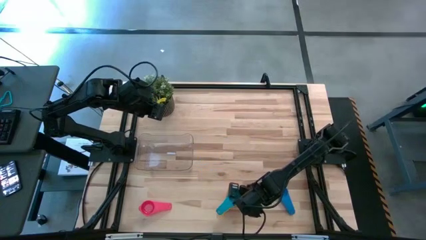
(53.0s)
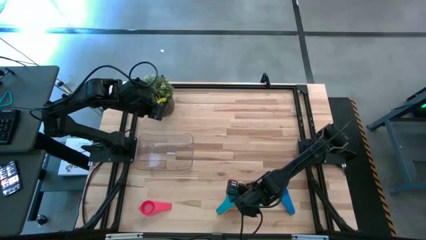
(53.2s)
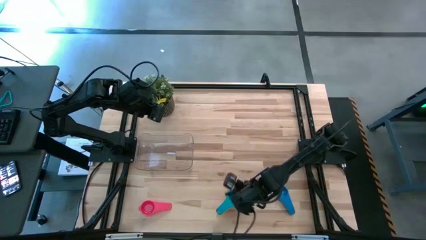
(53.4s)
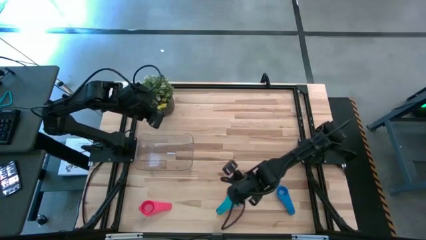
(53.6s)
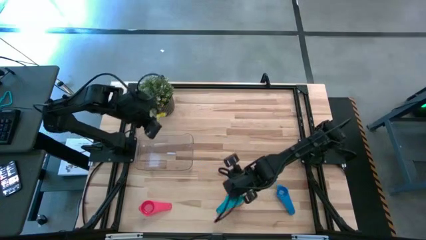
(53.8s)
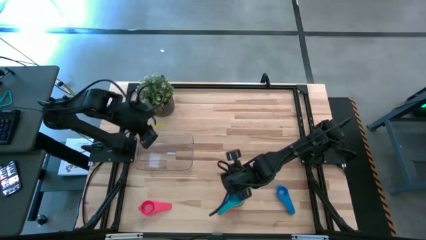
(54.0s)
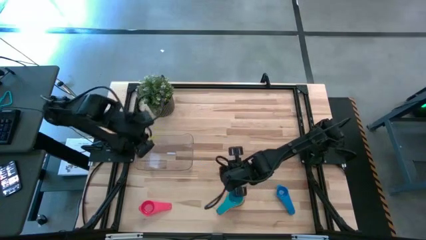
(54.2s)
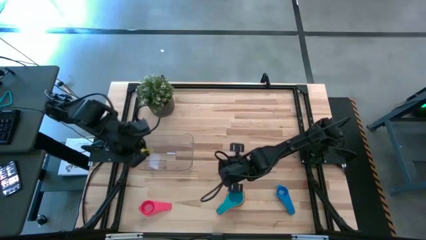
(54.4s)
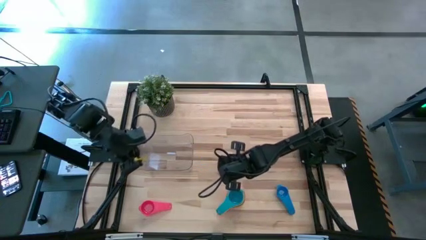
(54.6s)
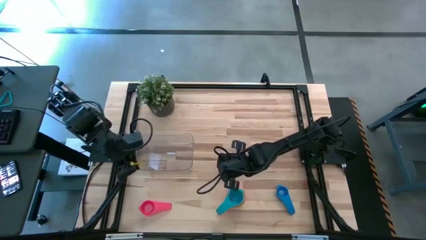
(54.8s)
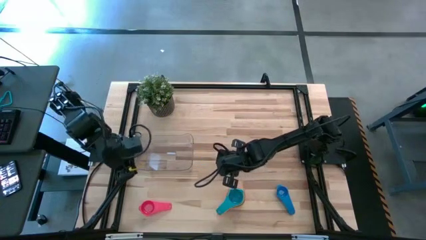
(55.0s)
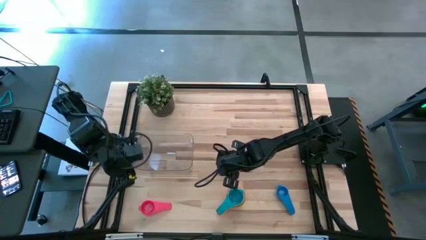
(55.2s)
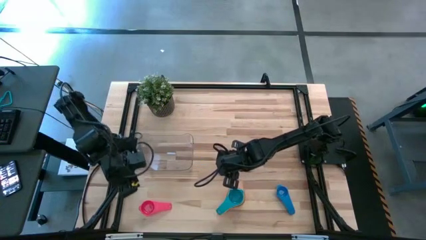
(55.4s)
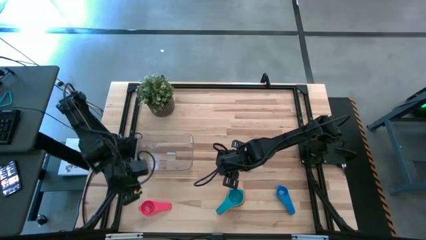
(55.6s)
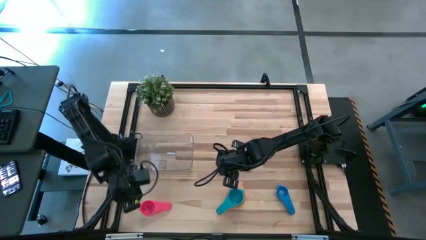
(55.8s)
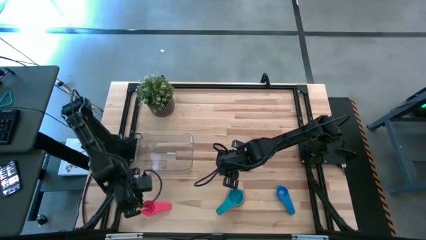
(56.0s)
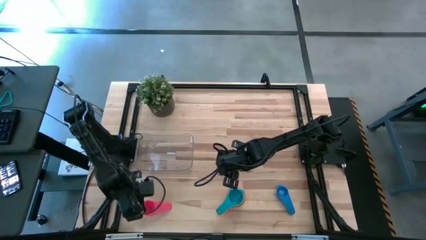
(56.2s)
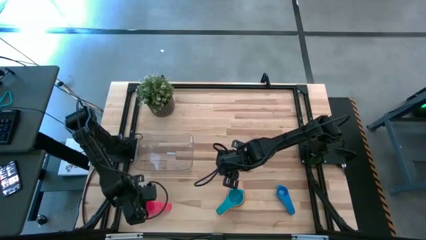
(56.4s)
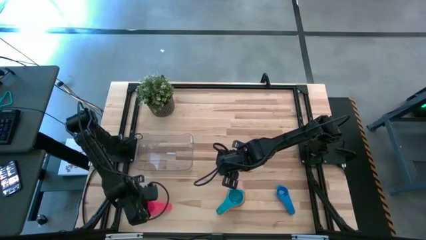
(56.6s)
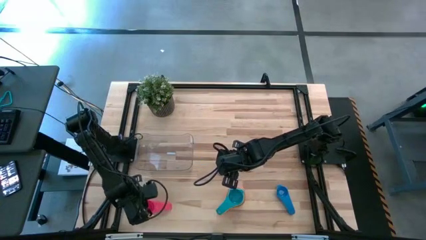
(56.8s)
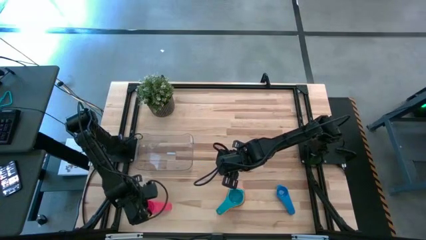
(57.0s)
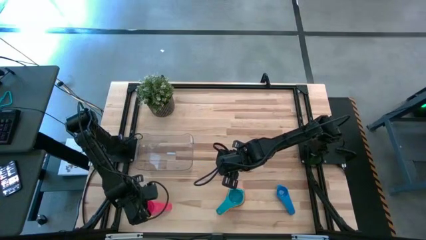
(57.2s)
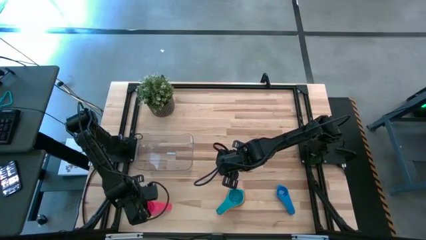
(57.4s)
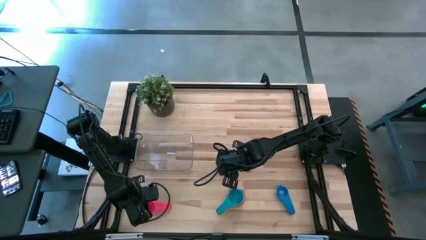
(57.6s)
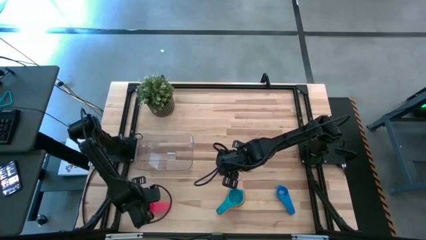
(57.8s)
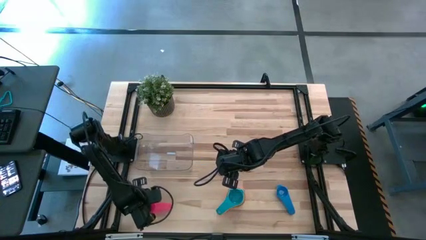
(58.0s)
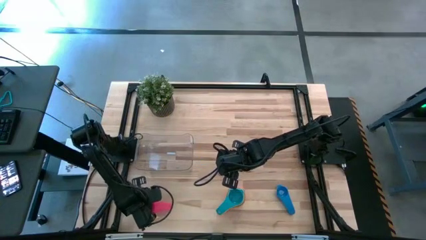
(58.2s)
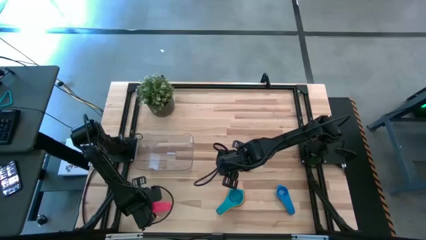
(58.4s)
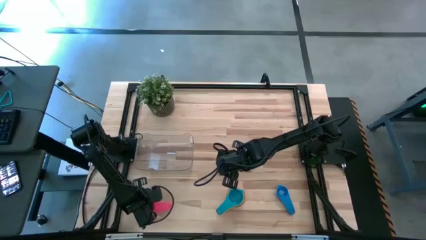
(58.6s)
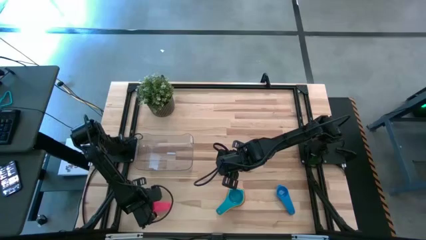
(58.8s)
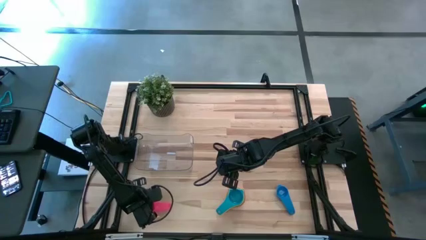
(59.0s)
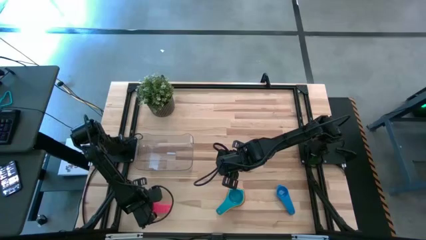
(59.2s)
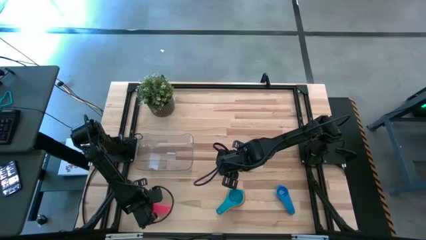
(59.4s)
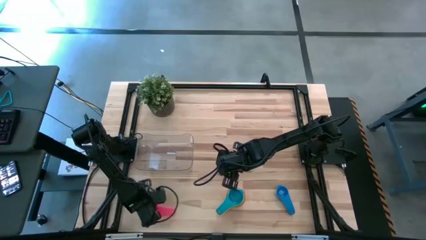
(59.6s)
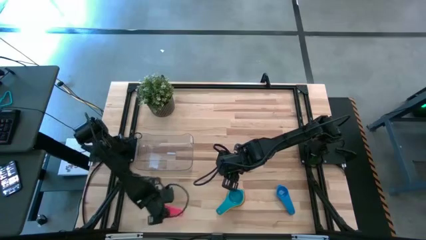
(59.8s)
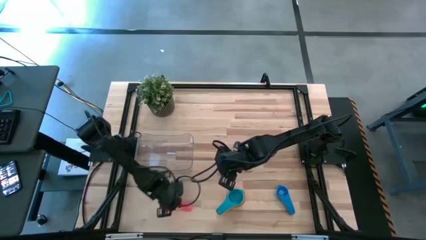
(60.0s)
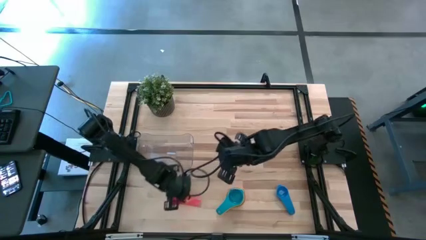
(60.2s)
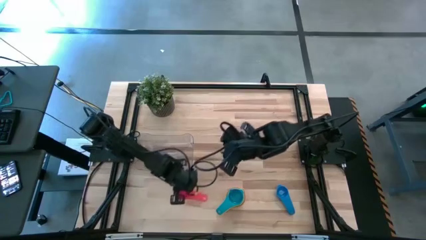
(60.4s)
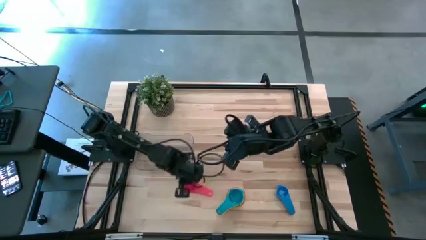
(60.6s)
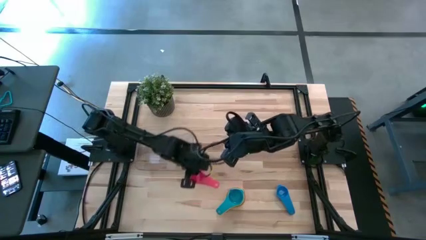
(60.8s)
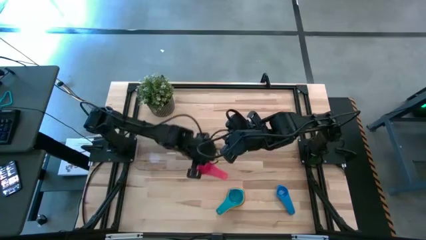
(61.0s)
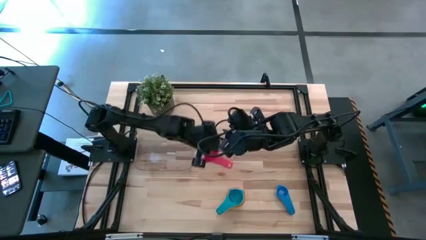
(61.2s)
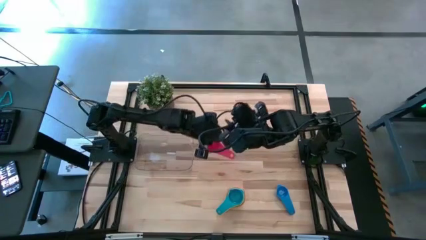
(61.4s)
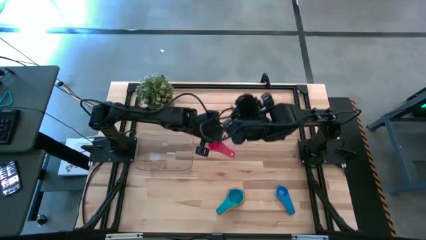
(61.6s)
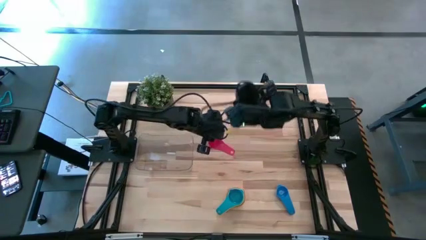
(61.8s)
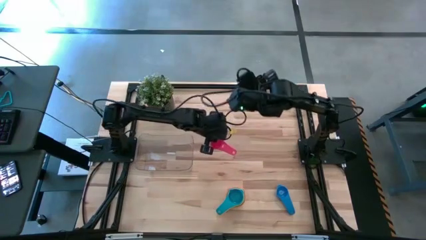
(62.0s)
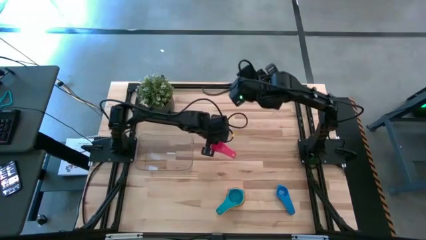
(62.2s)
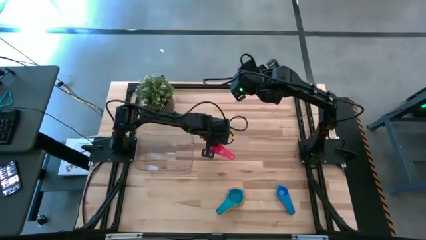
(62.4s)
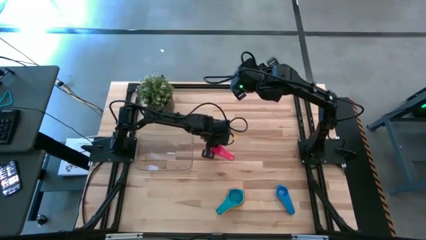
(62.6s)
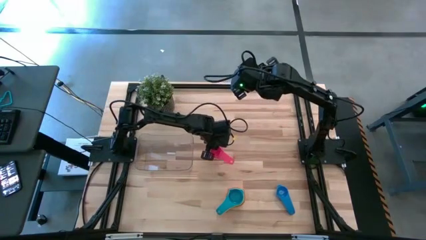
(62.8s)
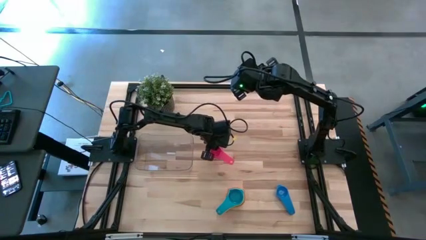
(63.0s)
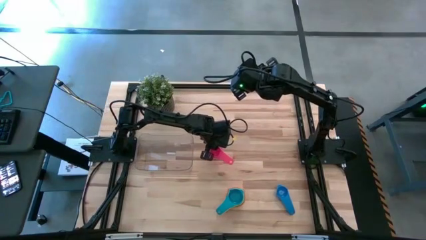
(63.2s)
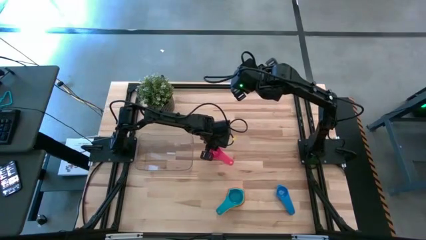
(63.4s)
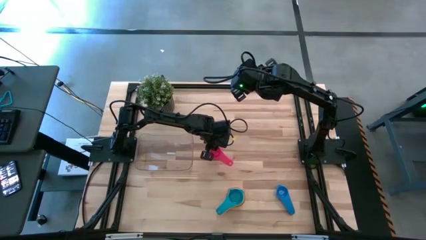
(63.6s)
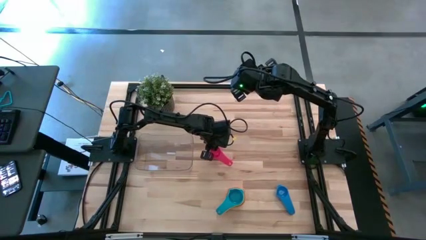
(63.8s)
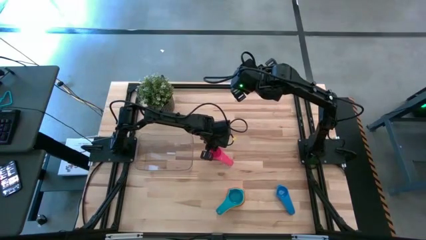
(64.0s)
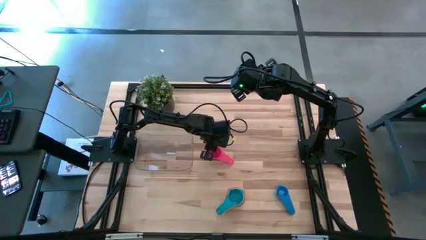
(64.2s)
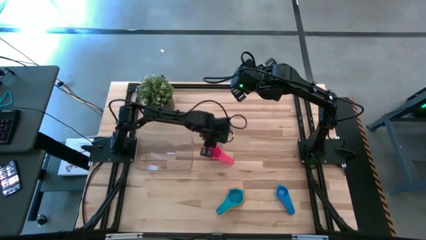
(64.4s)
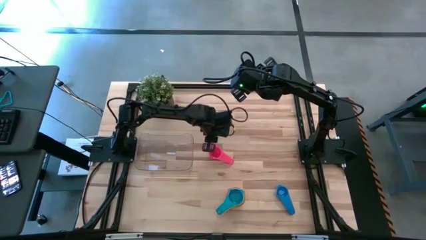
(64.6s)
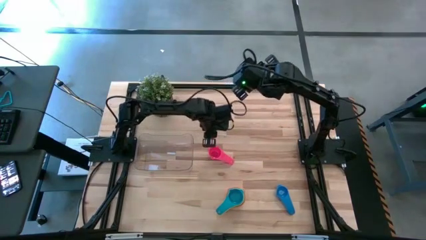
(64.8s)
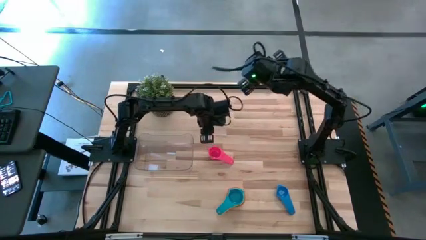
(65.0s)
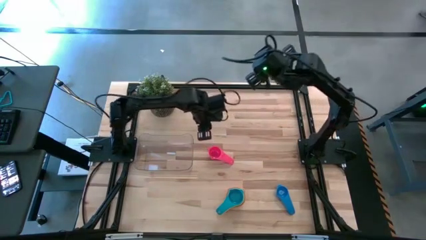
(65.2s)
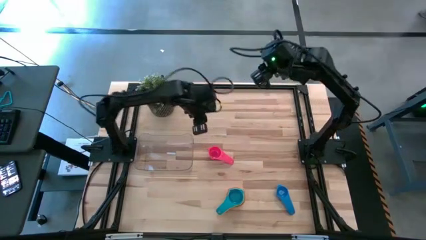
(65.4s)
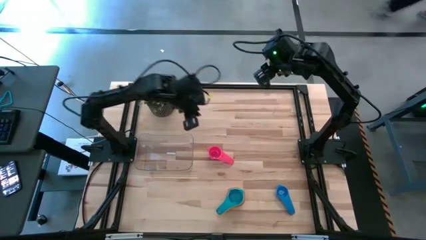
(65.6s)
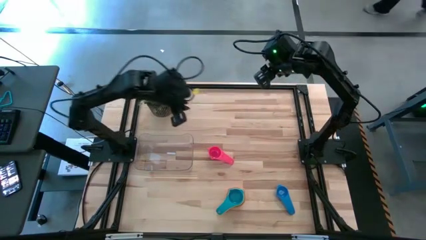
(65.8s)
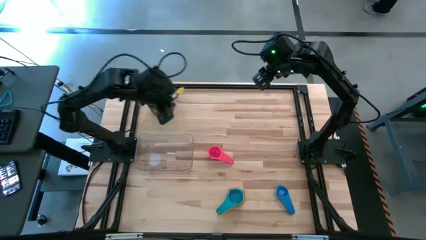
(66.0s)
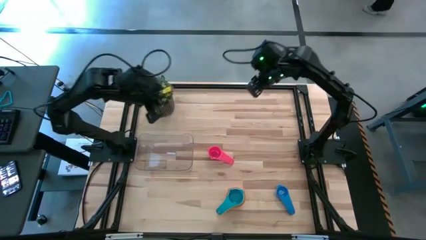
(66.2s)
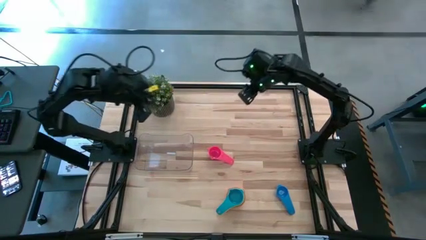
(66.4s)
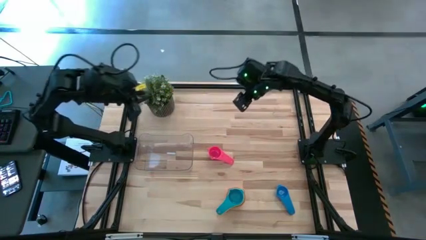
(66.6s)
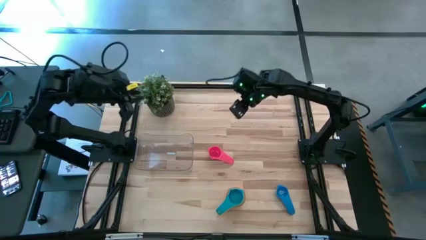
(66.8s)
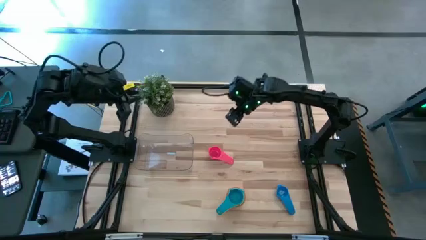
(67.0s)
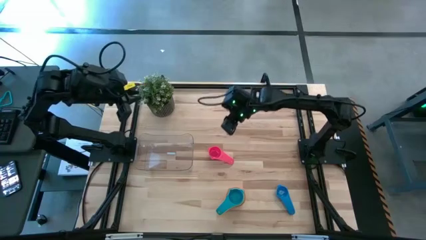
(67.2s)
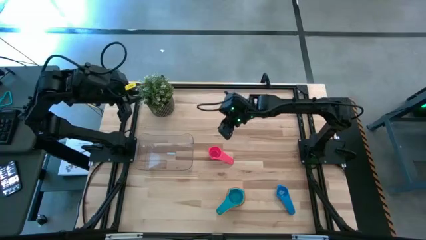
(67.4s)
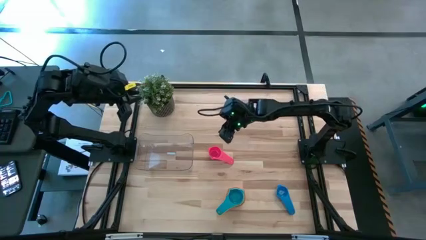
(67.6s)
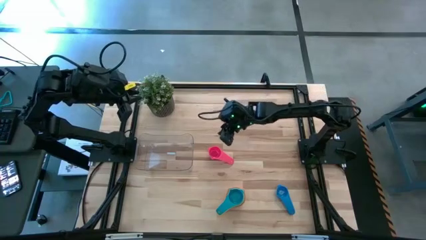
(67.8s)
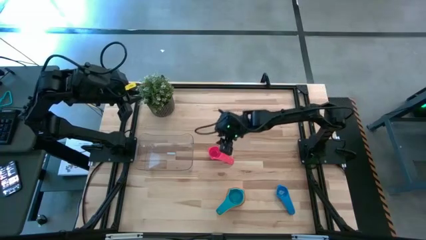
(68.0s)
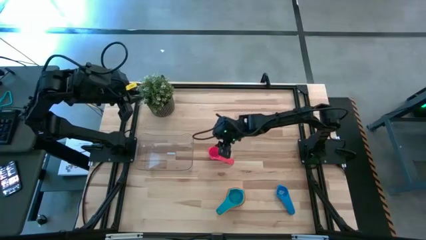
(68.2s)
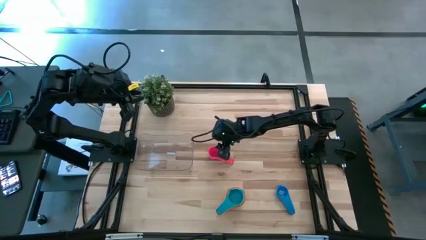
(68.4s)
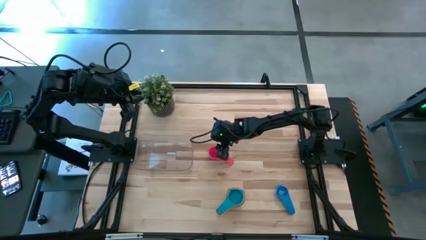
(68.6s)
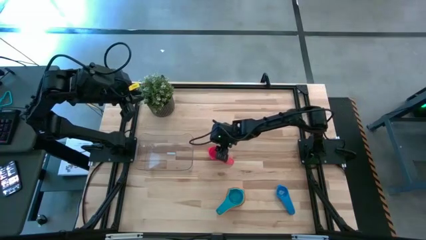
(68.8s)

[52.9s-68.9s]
Task: Nest measuring cups in basket
Stack the red measuring cup on top of the light blue measuring cup
